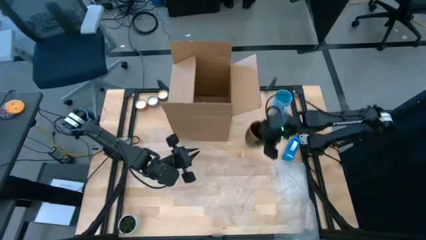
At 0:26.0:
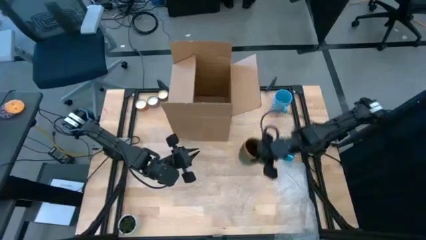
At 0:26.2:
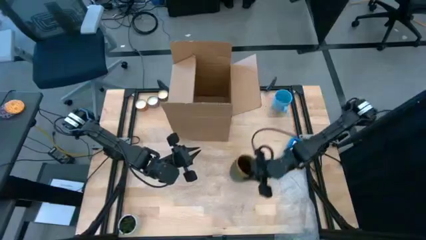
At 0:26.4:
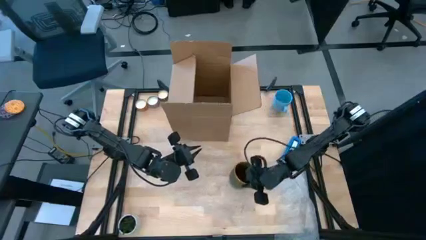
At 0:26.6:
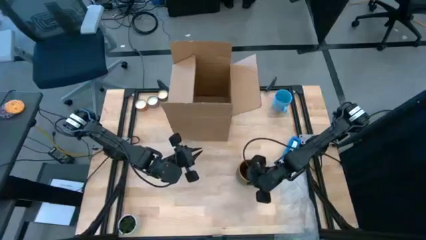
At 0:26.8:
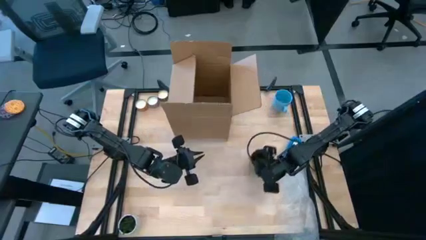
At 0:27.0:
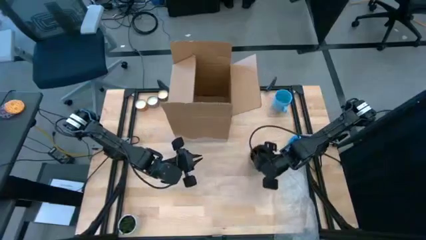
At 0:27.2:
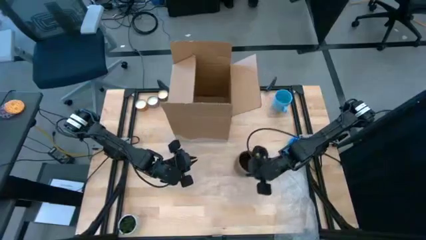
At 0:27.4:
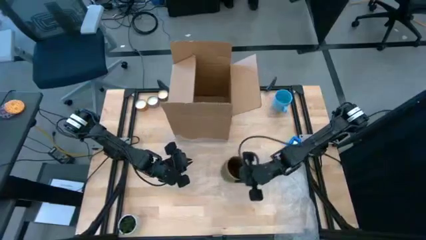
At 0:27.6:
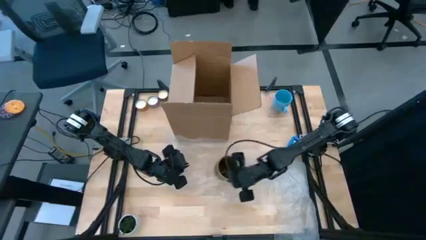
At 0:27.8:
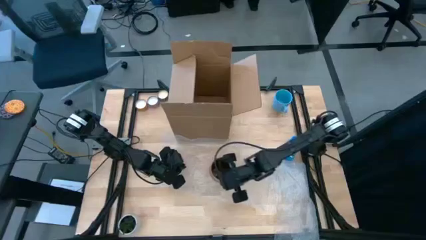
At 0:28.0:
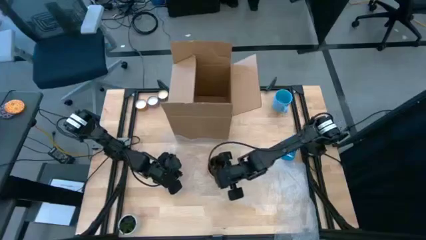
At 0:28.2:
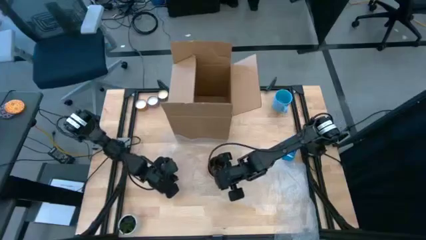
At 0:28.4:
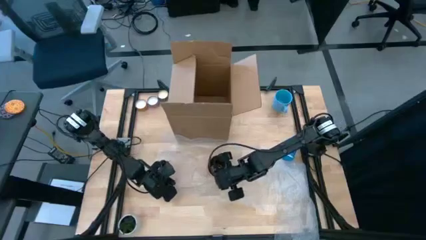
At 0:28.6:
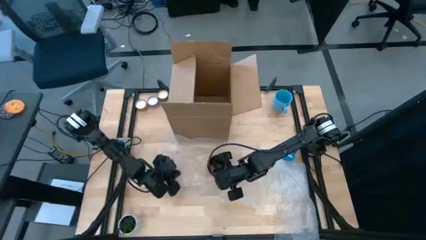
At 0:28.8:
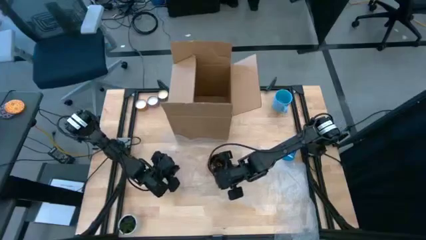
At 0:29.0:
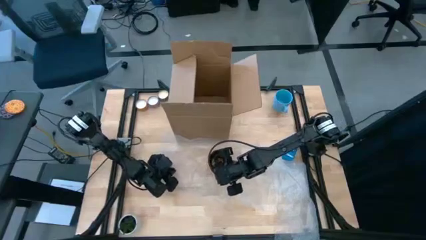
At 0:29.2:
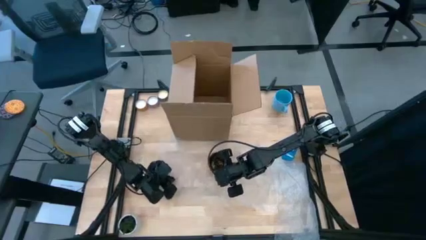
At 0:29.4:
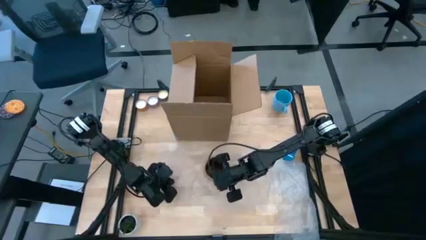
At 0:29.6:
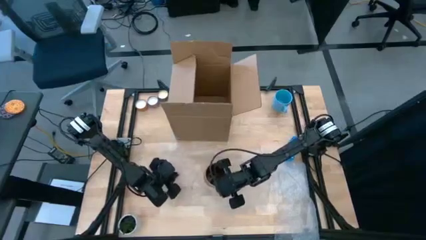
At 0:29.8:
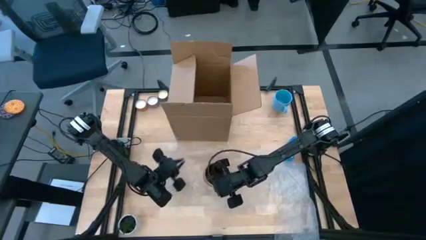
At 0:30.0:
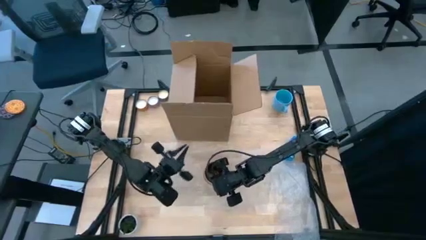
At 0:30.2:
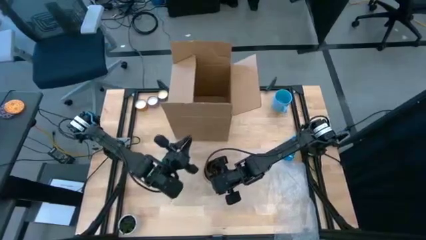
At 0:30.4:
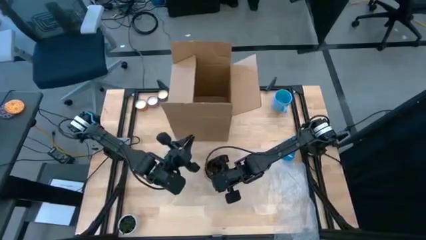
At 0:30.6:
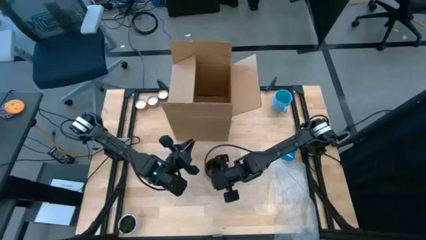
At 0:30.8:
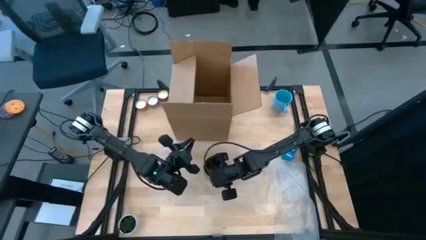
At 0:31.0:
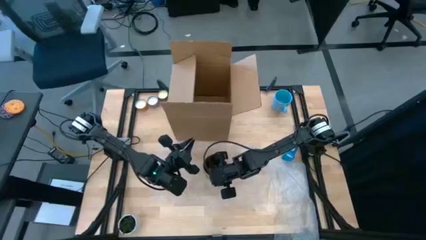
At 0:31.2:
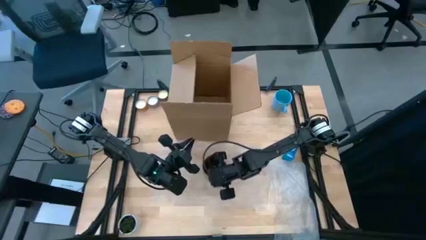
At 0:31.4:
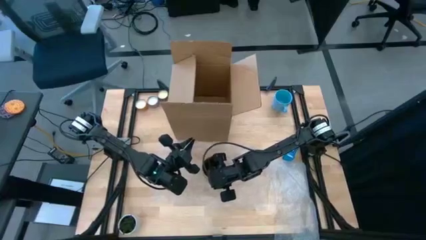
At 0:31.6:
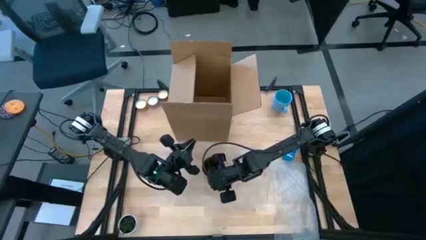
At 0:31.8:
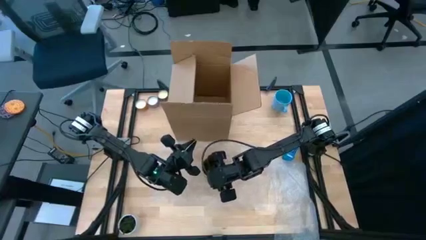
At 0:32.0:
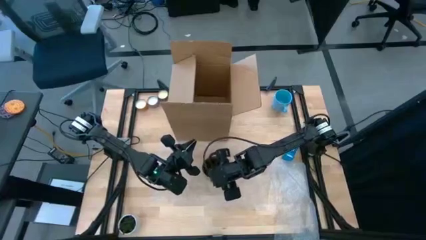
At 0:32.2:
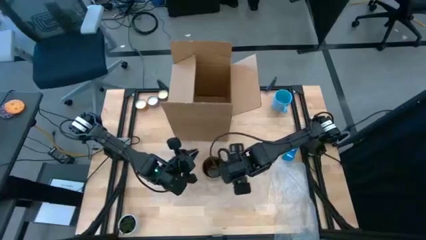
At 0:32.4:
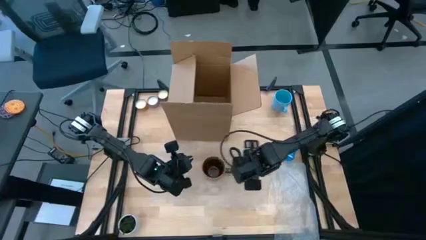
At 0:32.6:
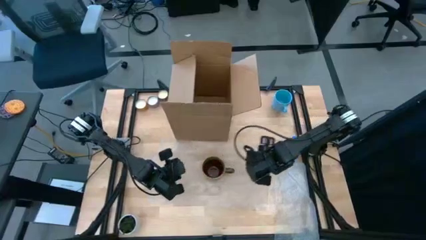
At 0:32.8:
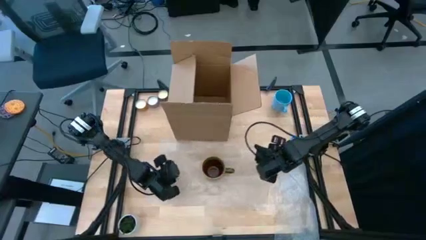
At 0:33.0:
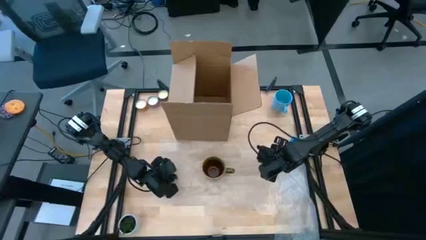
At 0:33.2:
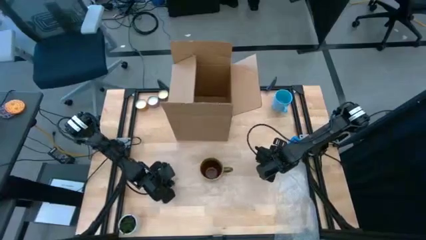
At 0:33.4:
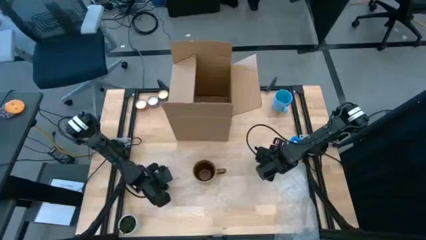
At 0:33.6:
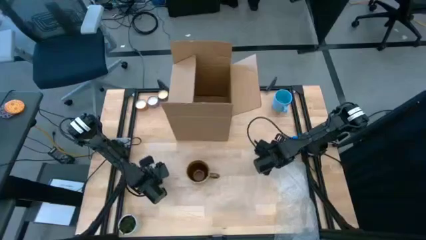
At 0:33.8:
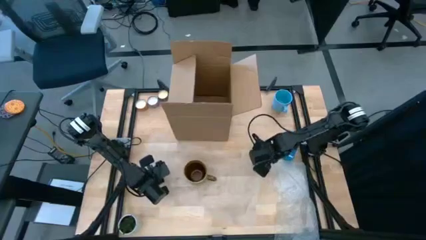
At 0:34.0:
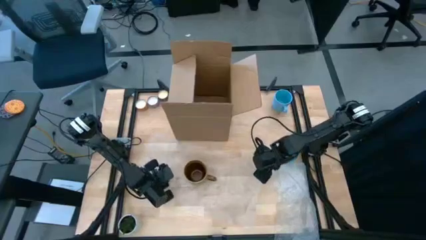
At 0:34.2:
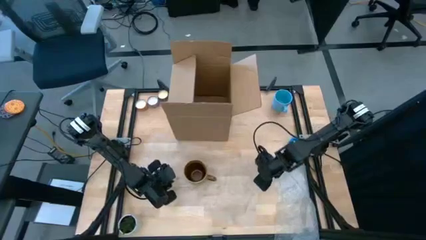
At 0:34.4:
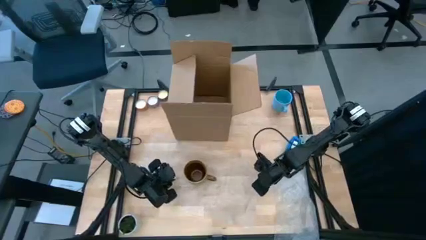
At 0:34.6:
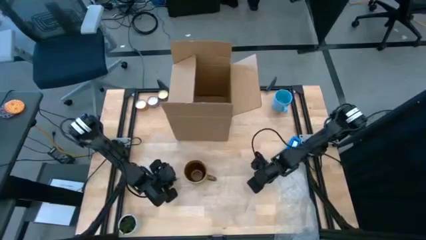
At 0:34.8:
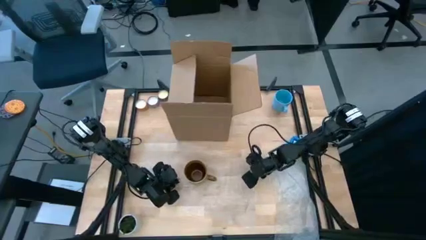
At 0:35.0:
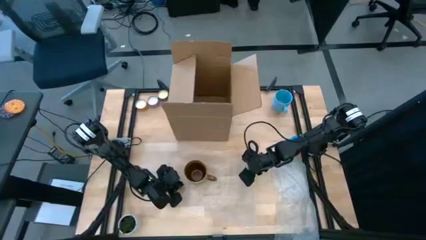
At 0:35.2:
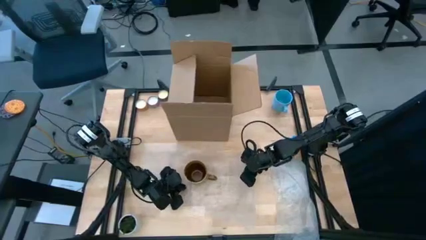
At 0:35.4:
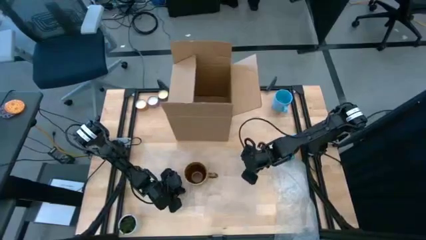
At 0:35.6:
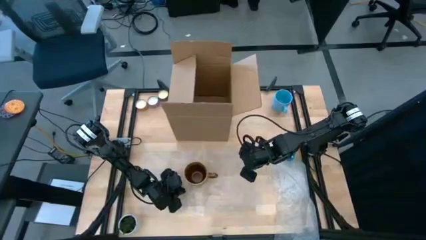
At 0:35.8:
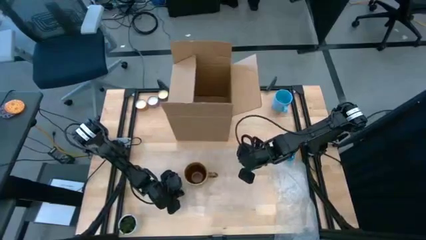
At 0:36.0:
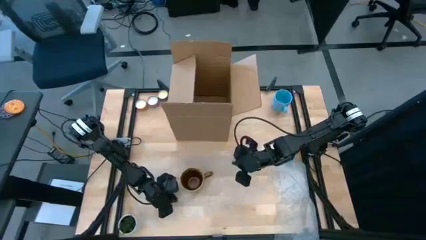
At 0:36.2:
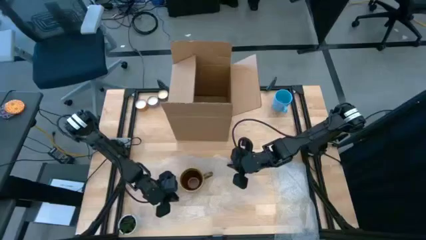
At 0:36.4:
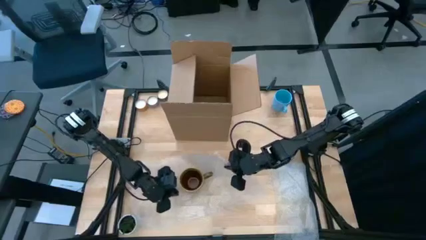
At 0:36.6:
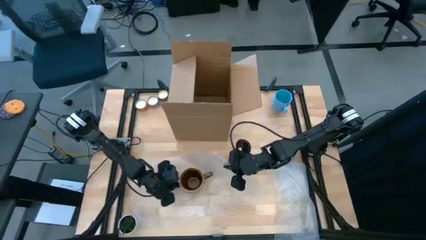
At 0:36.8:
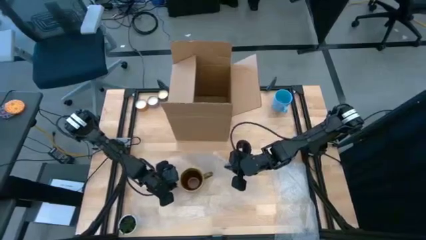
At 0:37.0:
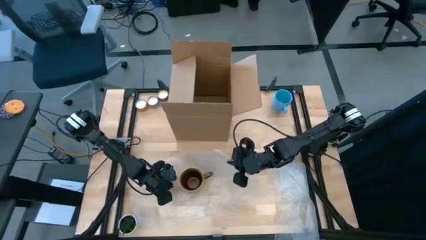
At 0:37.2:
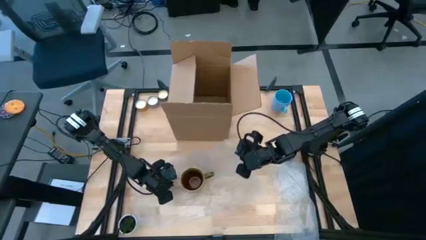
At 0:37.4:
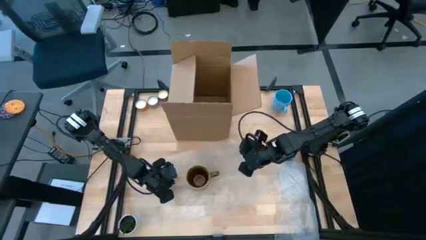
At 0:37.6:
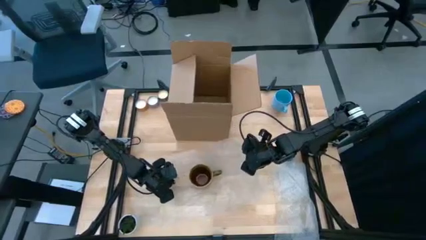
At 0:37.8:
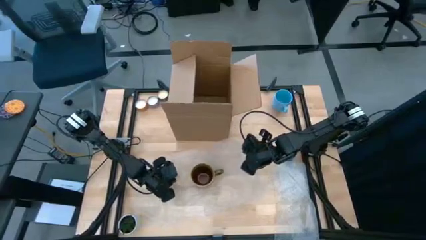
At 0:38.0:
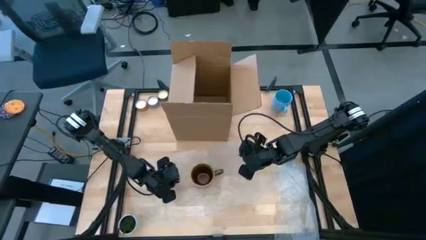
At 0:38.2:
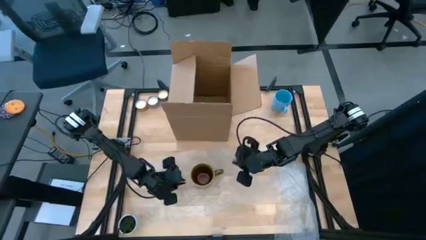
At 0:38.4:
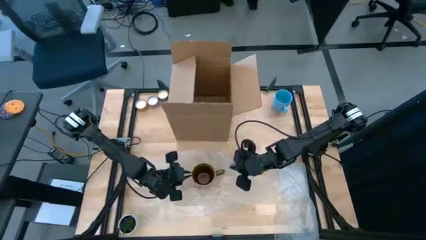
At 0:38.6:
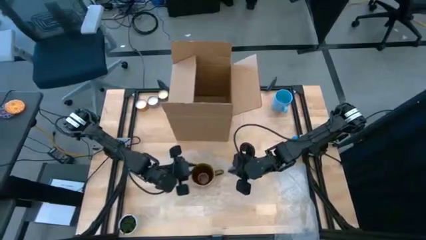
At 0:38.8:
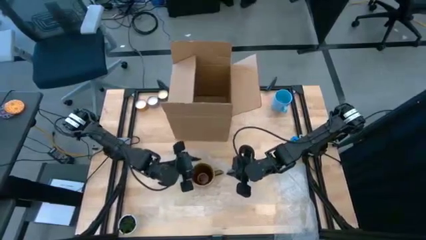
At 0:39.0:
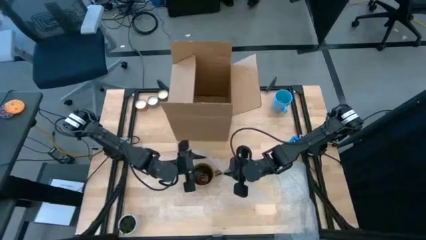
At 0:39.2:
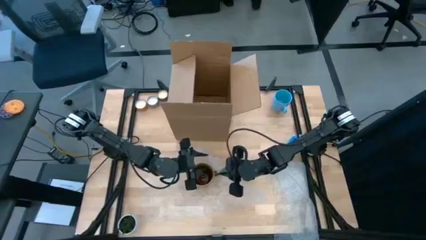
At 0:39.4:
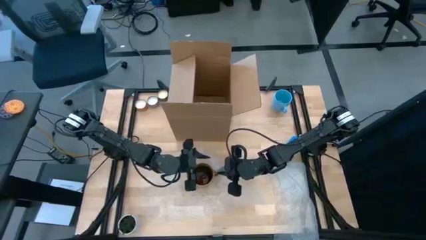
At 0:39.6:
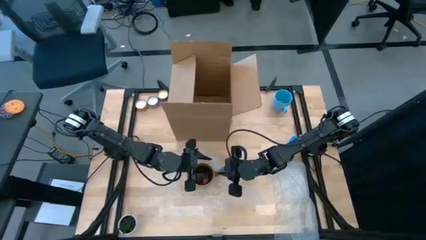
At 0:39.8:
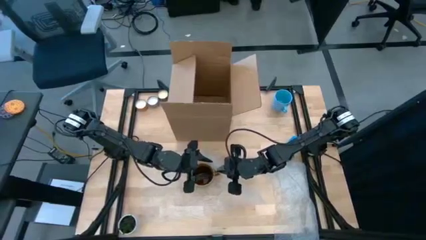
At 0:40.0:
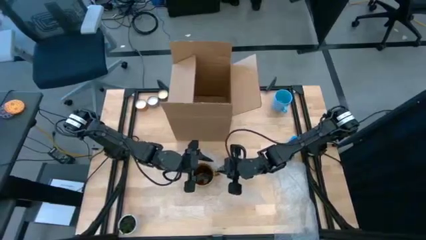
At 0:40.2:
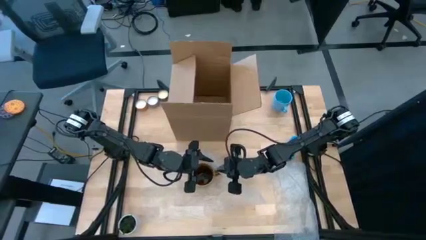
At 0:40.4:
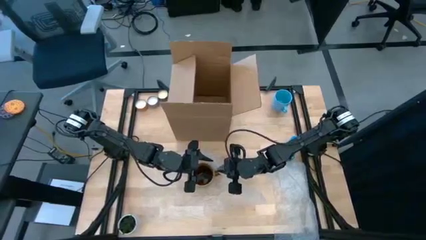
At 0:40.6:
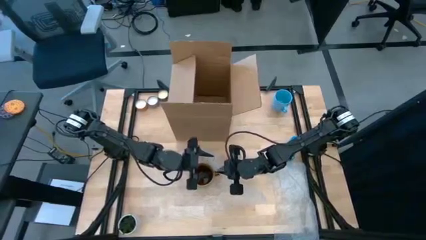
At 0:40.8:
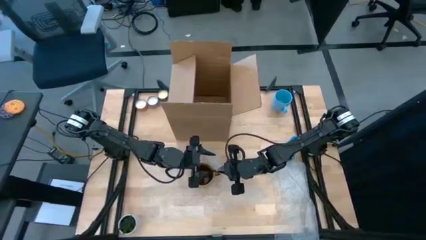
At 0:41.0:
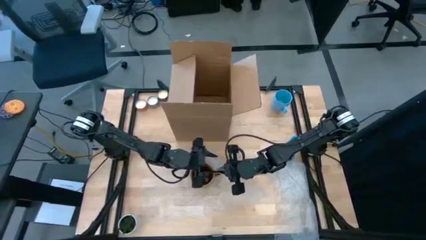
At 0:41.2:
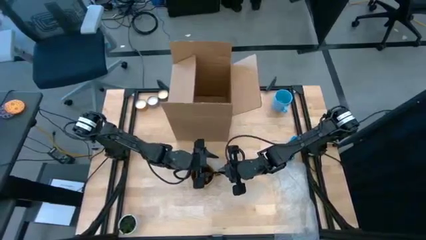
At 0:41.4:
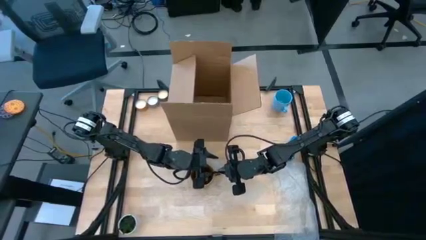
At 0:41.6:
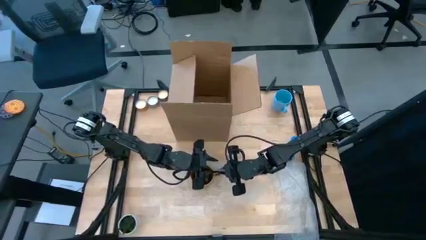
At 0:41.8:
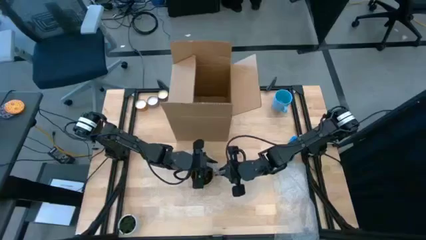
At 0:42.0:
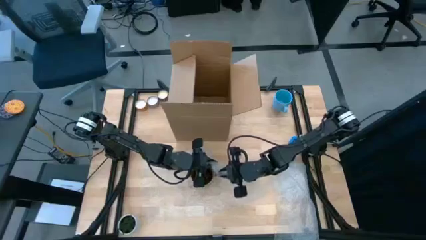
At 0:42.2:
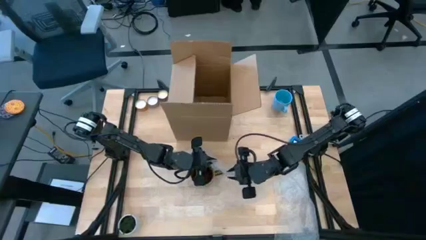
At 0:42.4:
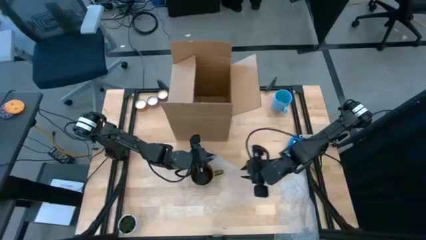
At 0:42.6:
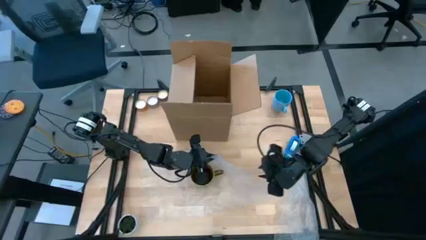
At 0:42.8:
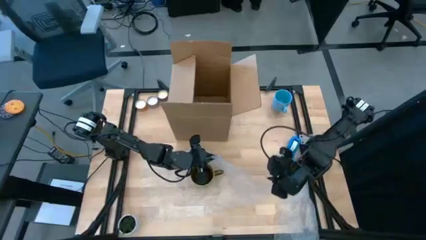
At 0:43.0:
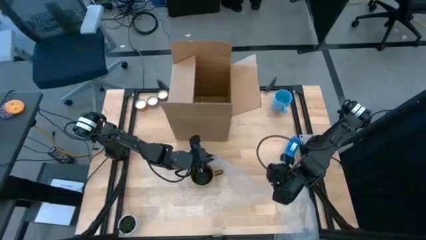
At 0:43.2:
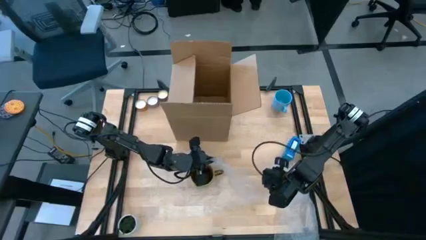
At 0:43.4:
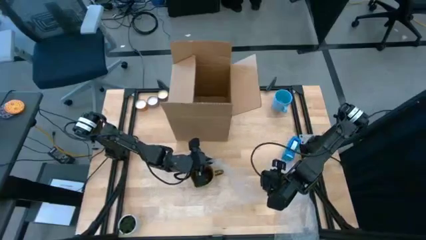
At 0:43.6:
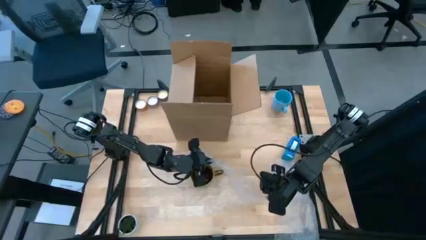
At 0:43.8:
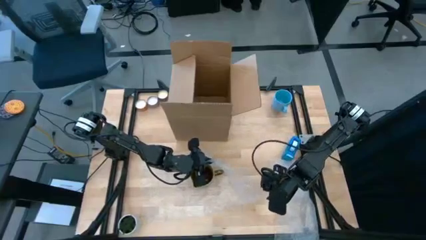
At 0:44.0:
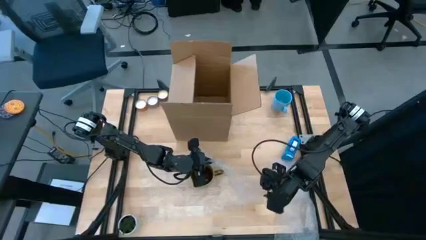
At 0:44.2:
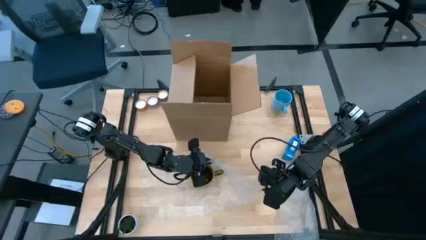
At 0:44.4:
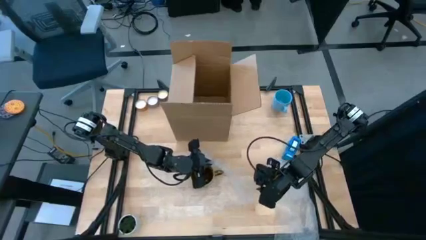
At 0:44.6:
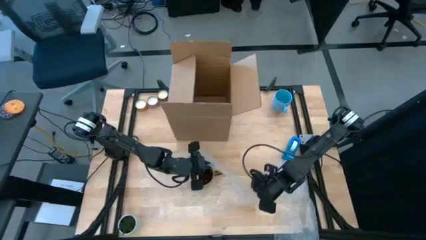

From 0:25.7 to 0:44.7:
Task: wrap mug
Wrap the brown cup with bubble wrap
